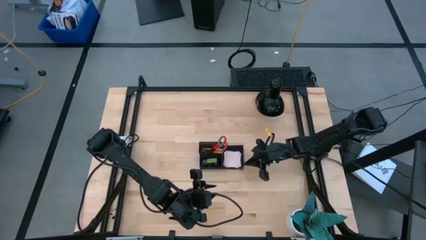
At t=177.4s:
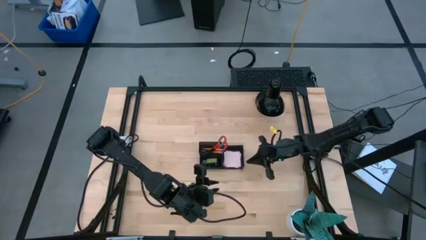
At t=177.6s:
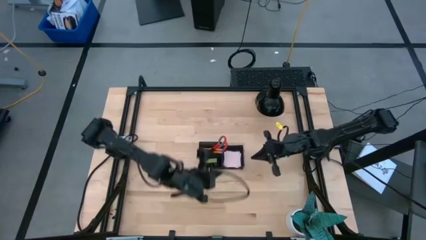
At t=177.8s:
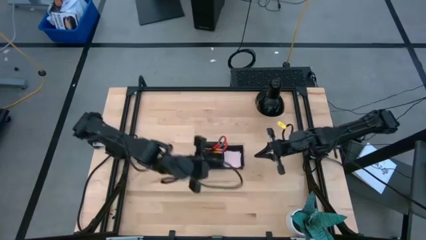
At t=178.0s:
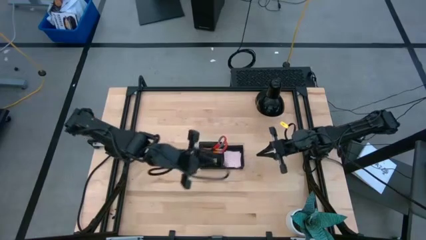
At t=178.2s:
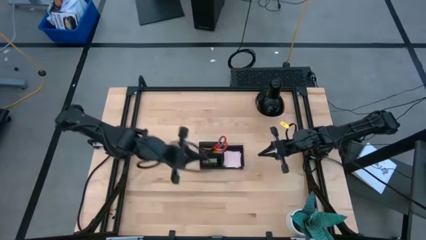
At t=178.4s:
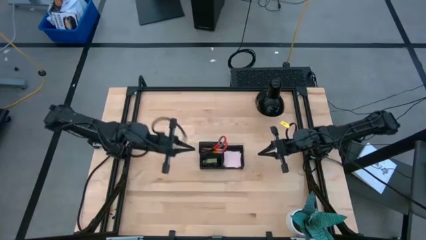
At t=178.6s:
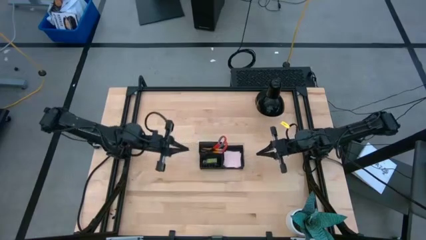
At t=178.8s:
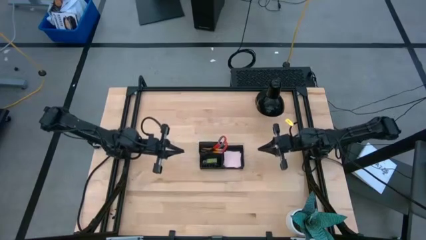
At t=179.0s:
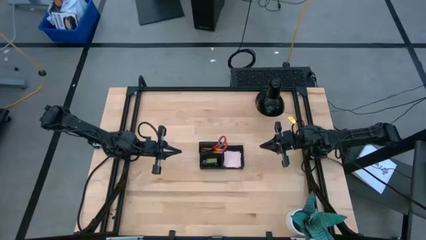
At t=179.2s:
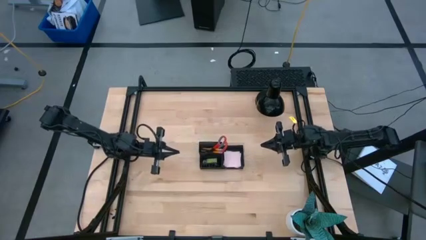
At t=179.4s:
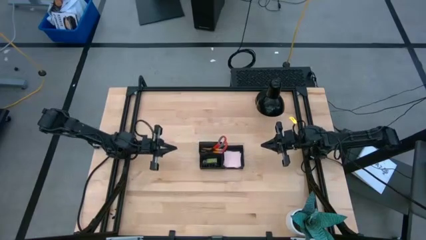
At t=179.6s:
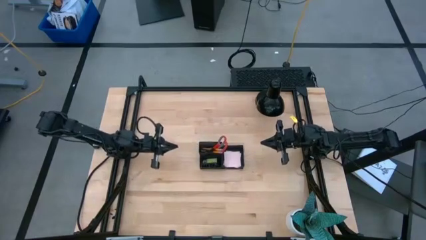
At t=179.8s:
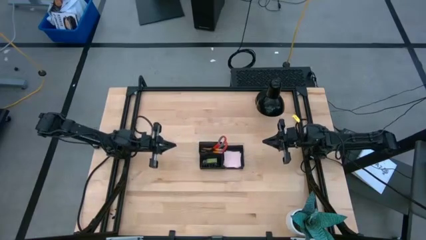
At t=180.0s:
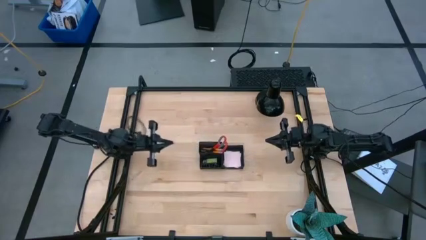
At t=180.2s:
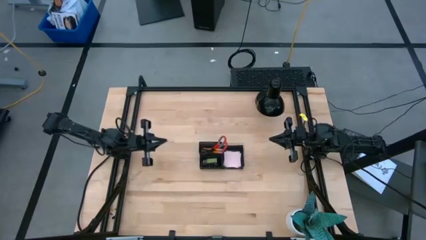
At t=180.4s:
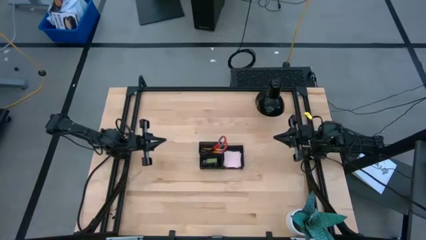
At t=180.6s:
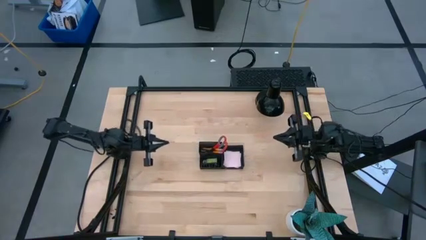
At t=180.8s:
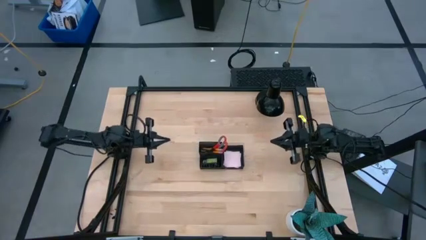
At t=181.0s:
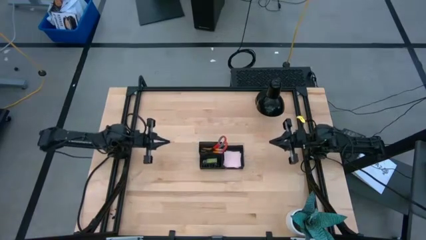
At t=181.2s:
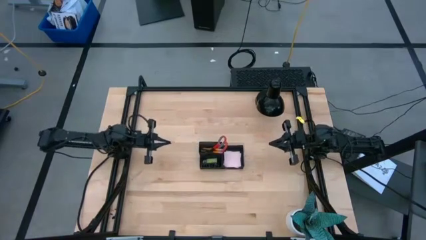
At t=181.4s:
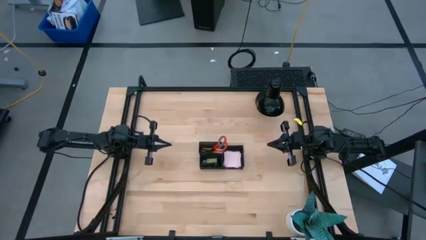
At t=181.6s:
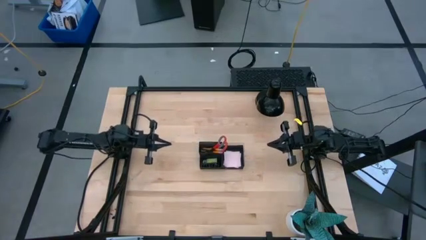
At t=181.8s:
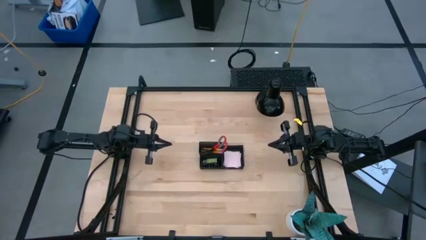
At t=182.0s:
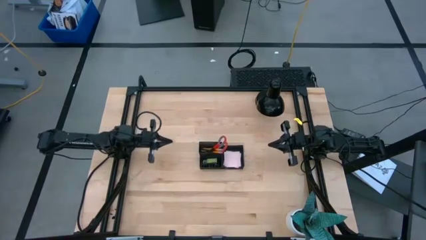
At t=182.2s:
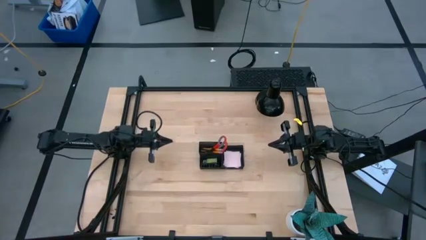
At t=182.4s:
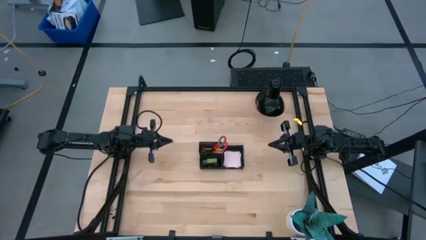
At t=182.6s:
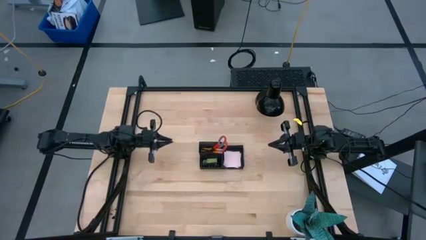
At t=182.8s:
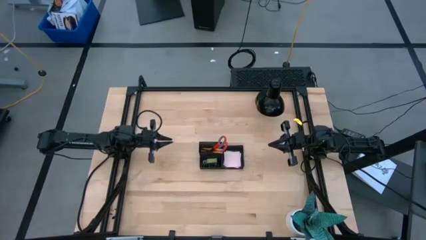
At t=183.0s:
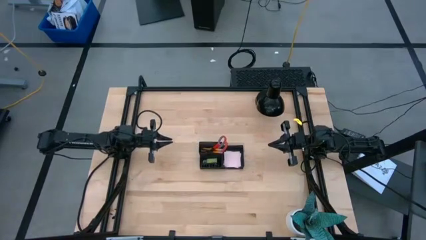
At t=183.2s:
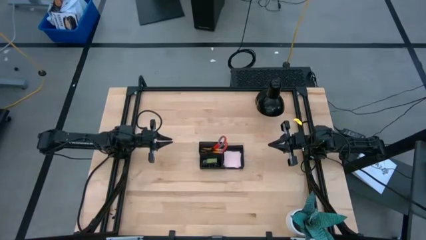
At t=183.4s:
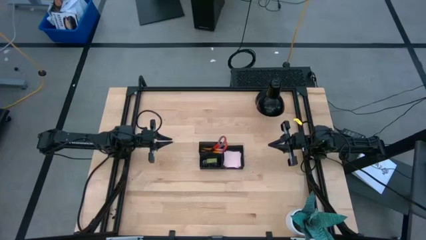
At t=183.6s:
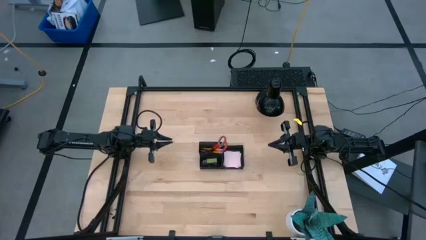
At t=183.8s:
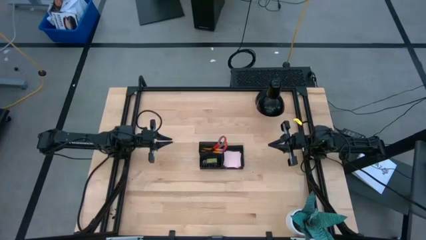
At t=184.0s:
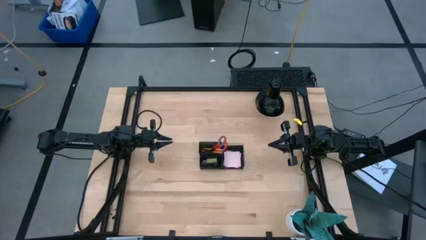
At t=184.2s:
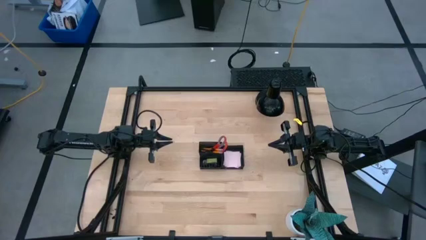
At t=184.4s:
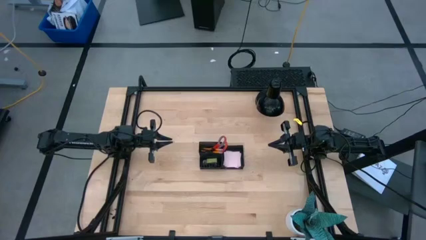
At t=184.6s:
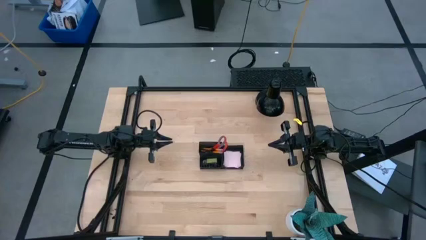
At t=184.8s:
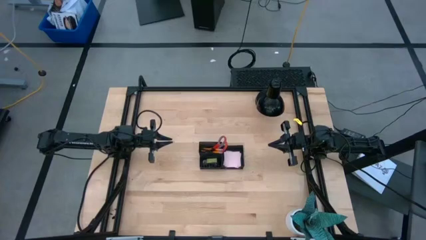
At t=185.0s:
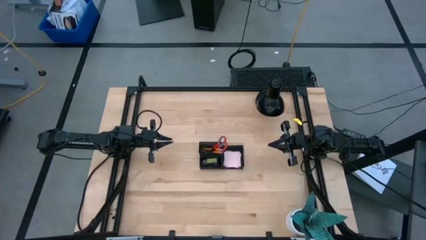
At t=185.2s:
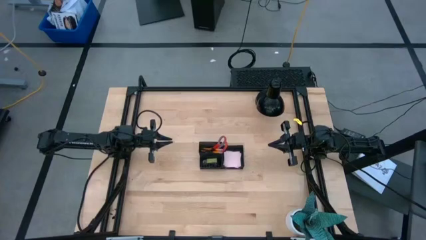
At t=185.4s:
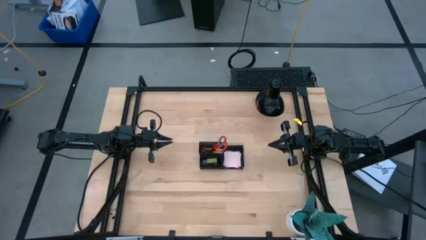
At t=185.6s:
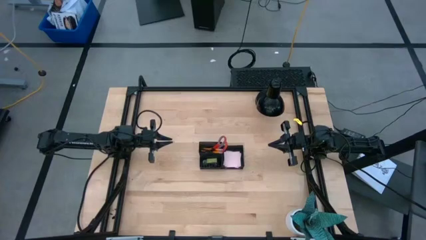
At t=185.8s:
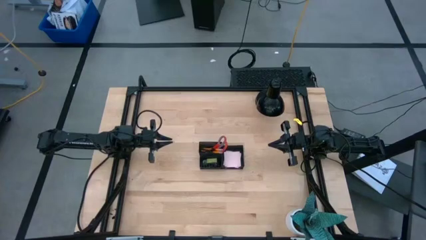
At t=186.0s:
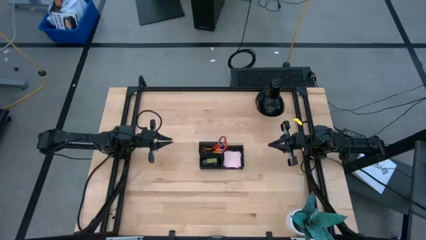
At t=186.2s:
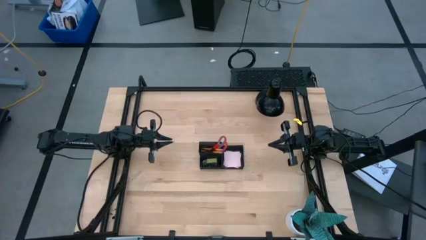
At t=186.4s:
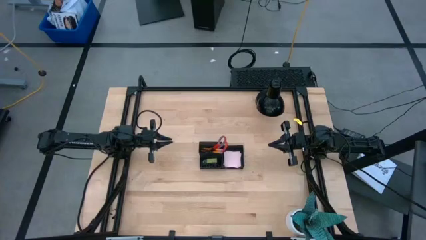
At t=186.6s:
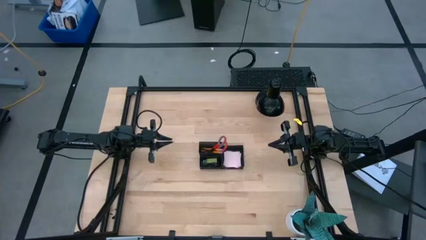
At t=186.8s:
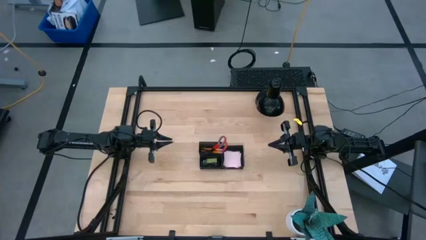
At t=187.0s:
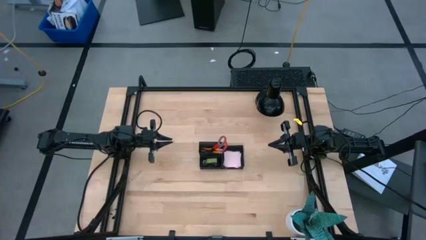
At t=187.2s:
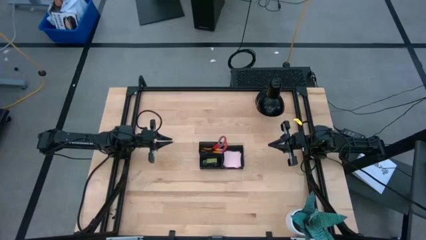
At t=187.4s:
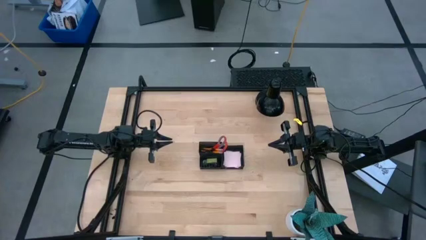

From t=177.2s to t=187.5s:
Task: Pick and place office supplies into organizer
Return to Home Position
